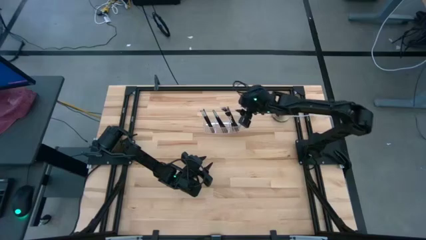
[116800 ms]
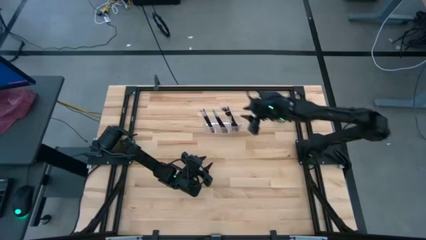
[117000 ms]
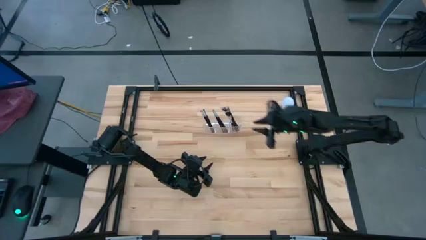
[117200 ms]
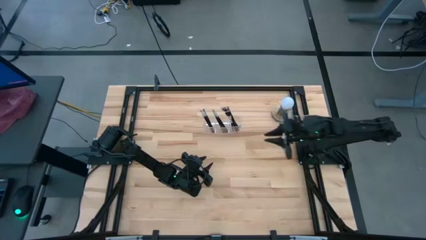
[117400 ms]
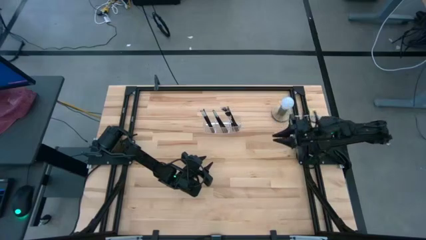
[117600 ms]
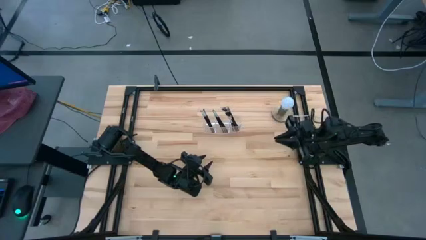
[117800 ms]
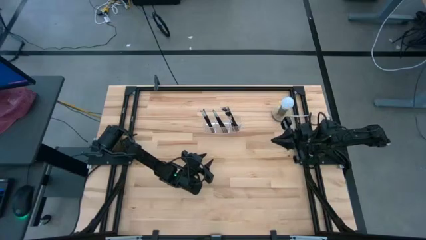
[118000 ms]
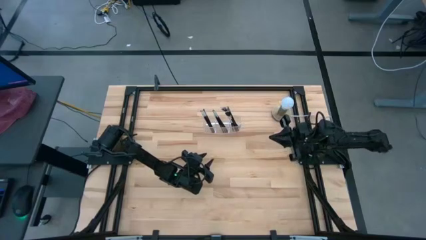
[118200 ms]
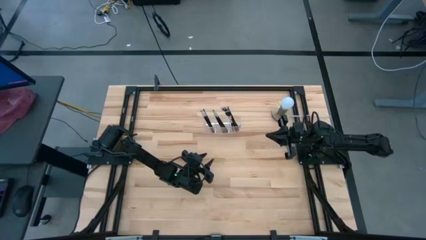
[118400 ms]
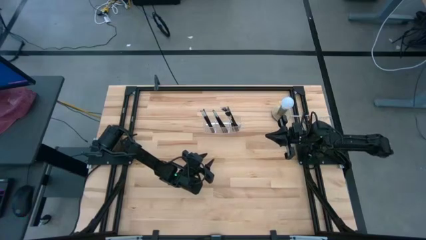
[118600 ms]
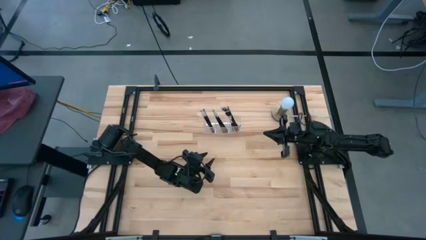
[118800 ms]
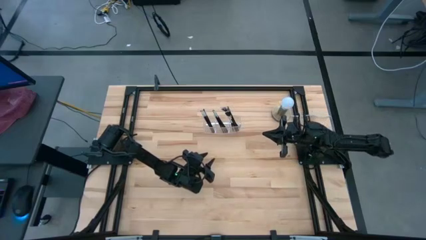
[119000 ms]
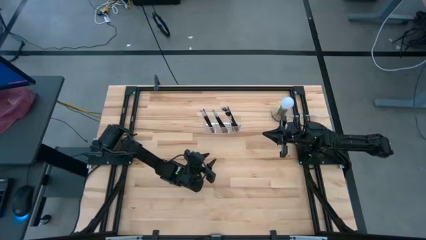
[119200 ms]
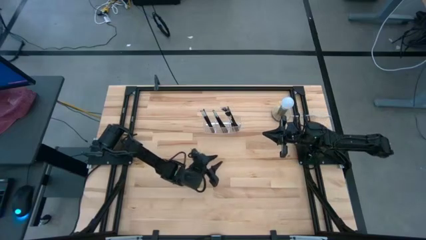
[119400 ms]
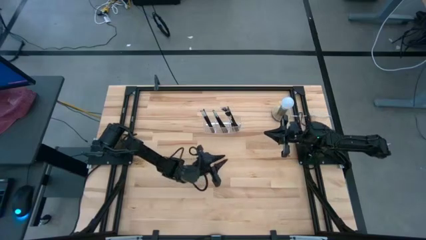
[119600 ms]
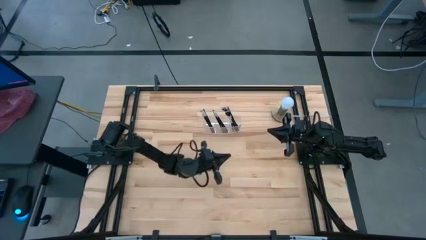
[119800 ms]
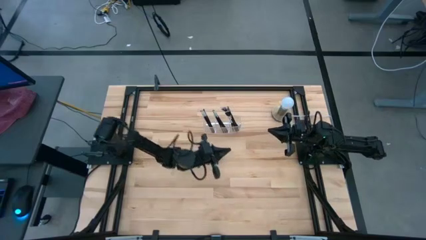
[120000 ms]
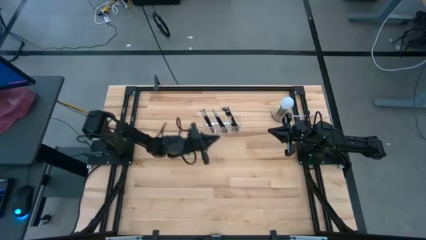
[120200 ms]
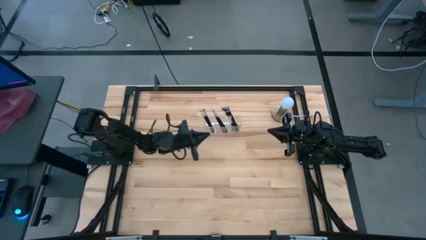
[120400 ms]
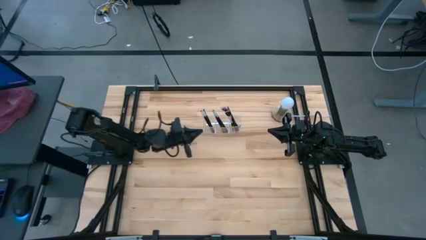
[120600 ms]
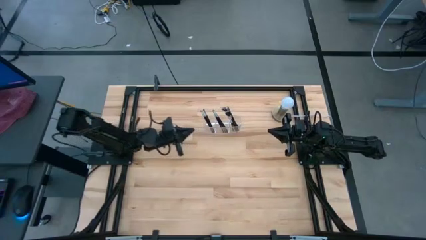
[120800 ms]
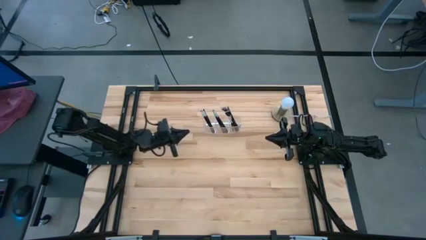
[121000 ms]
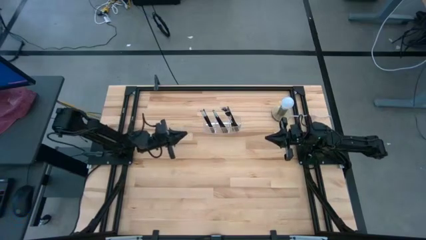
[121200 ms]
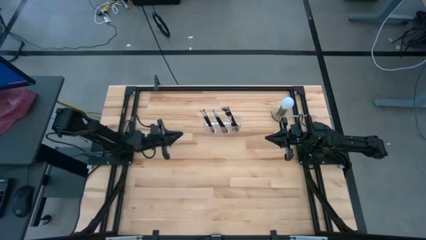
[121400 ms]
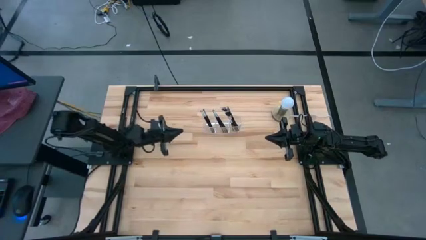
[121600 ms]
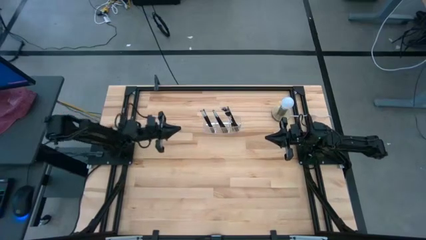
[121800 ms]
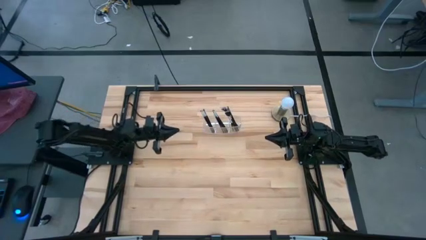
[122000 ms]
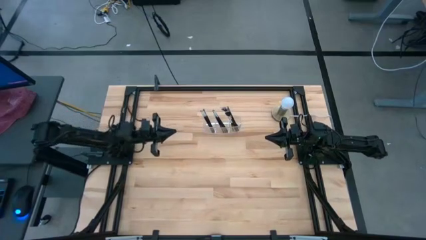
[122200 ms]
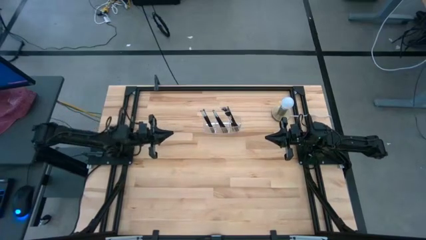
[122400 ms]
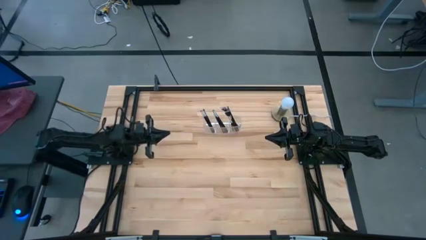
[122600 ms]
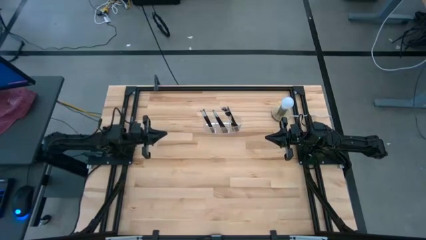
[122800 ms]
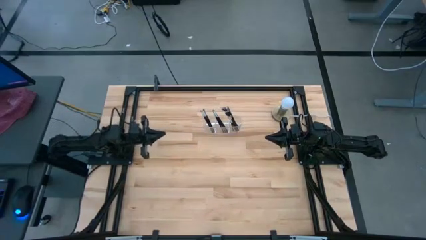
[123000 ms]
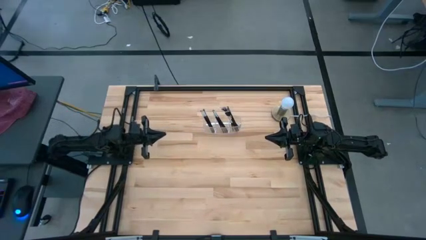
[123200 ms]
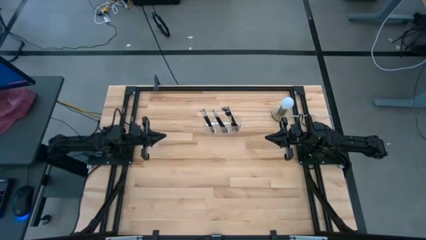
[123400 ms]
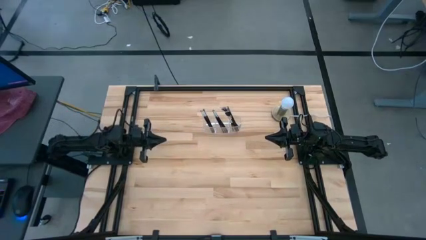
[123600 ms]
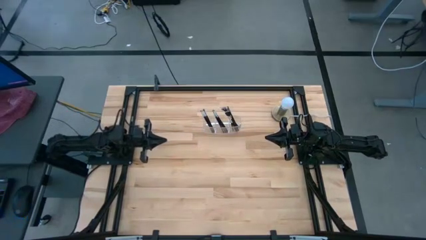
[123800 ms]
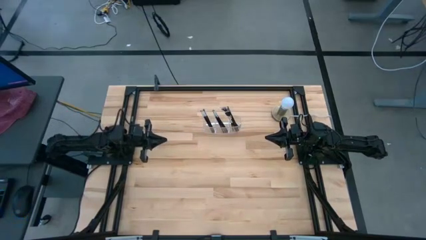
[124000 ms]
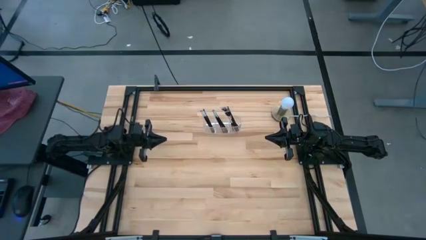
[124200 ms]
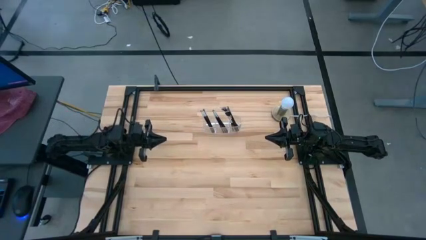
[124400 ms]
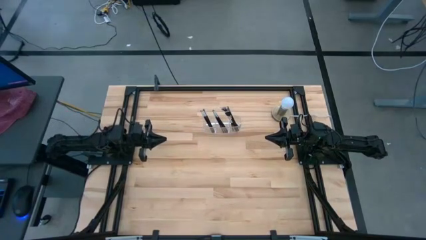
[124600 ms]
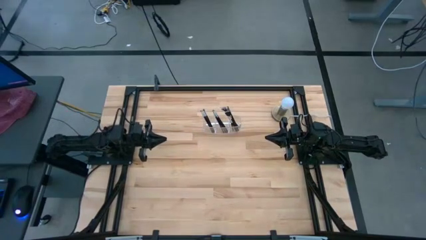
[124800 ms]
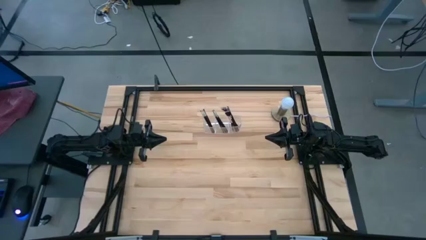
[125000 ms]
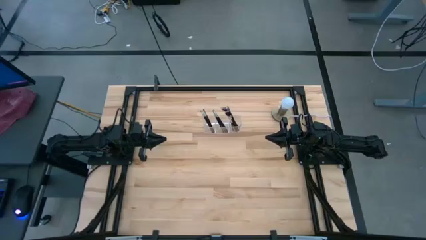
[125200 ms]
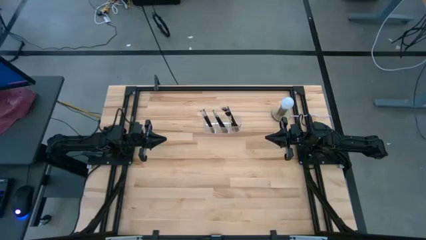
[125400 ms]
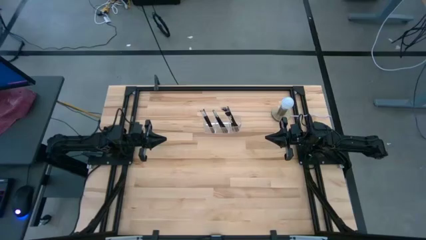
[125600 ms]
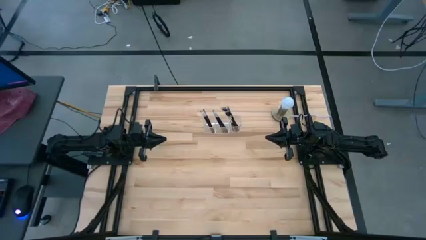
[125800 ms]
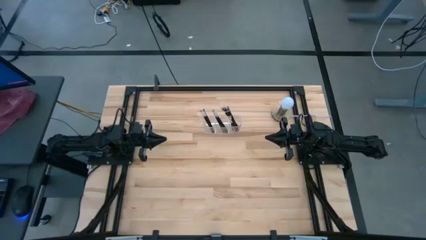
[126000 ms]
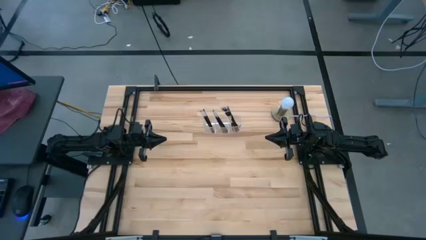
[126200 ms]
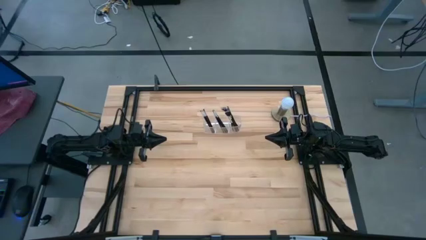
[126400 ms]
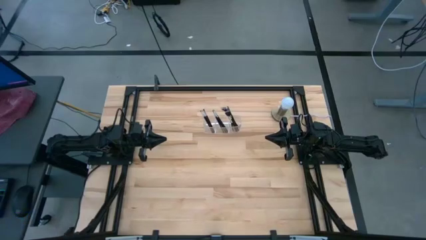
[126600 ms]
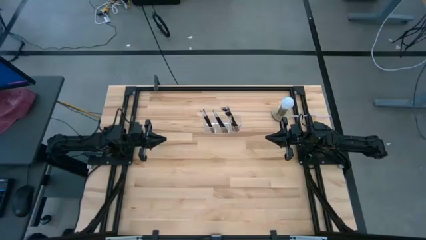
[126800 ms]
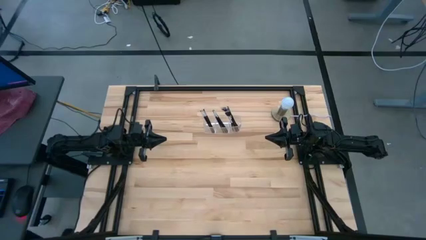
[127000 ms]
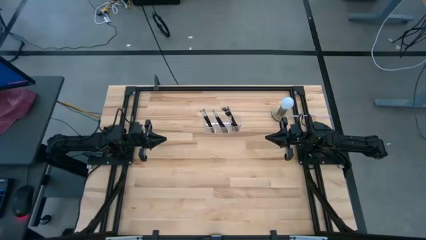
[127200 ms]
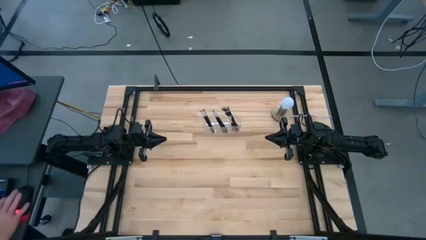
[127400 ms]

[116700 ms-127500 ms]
Task: Put items in baskets/containers
Return to Home Position

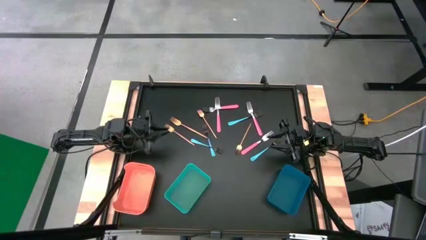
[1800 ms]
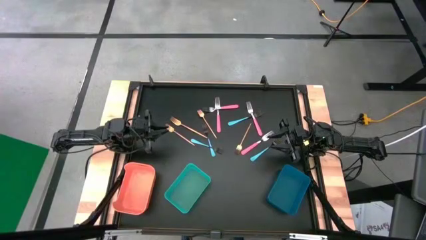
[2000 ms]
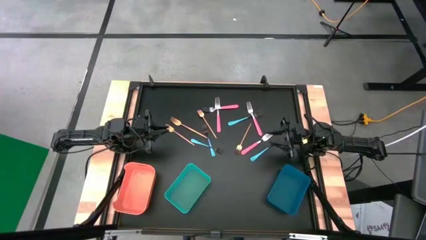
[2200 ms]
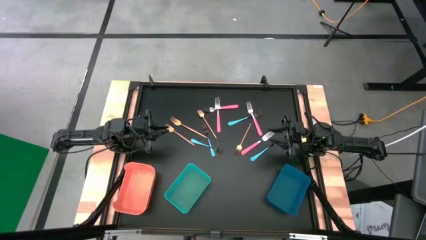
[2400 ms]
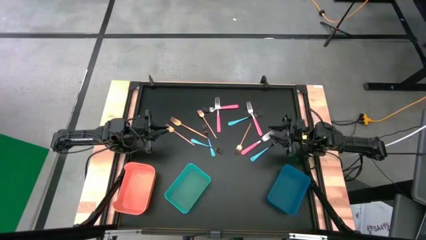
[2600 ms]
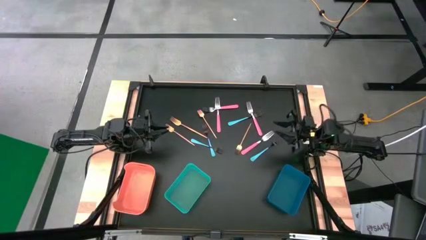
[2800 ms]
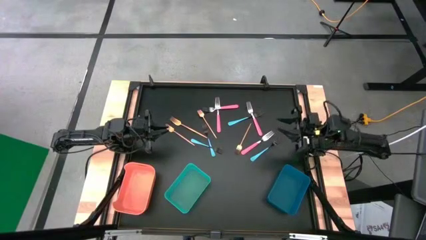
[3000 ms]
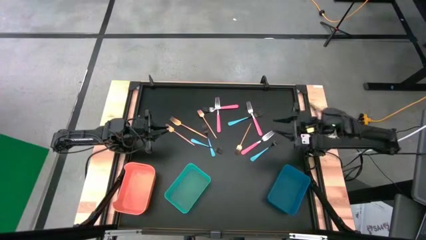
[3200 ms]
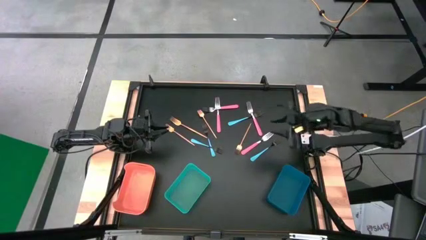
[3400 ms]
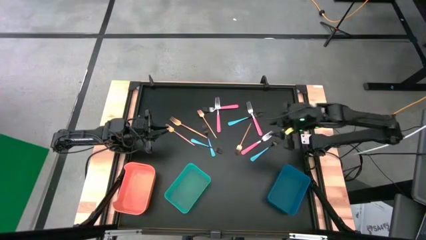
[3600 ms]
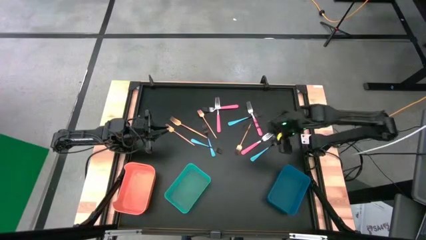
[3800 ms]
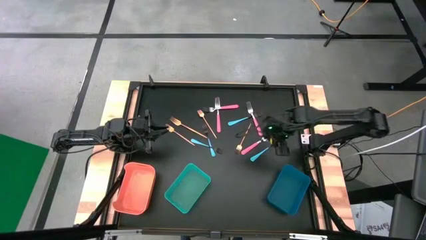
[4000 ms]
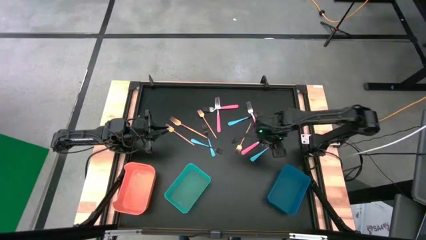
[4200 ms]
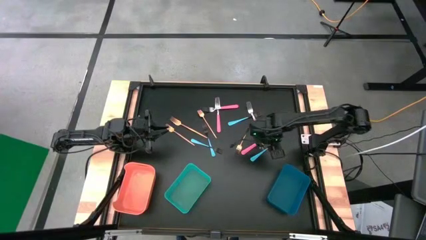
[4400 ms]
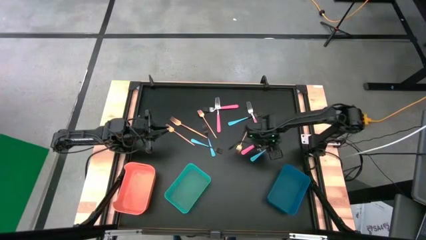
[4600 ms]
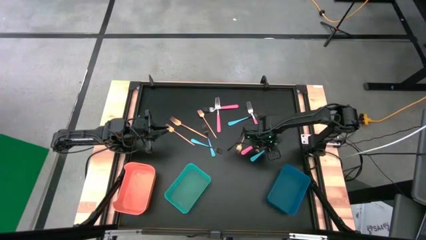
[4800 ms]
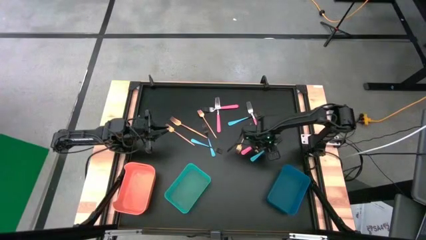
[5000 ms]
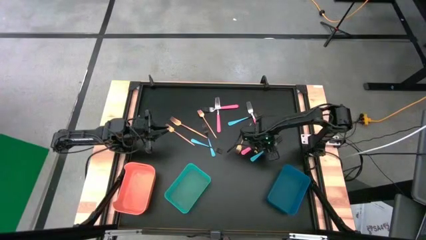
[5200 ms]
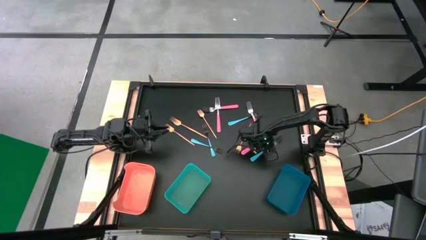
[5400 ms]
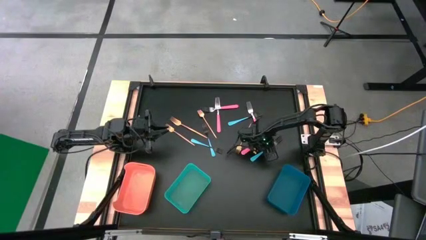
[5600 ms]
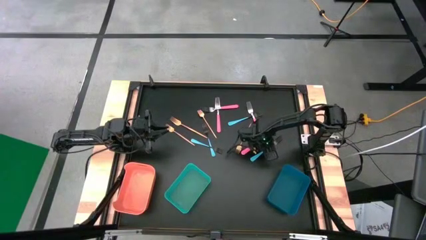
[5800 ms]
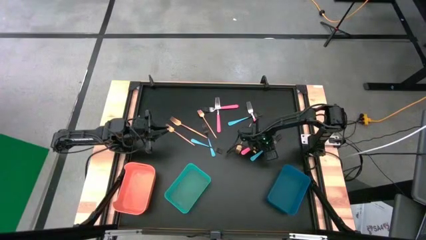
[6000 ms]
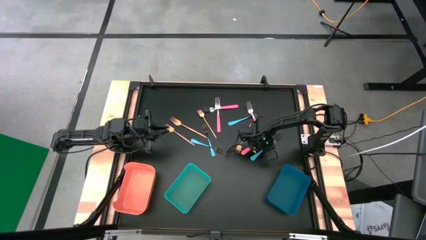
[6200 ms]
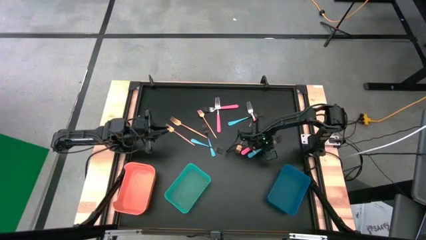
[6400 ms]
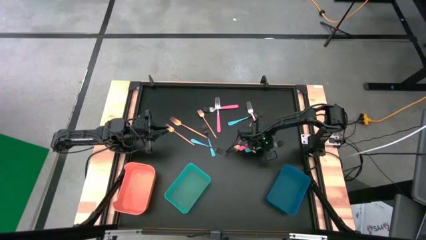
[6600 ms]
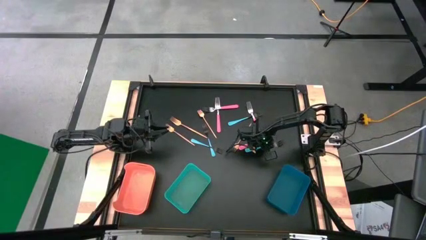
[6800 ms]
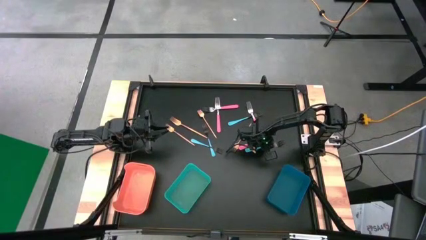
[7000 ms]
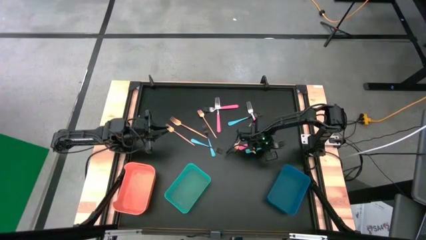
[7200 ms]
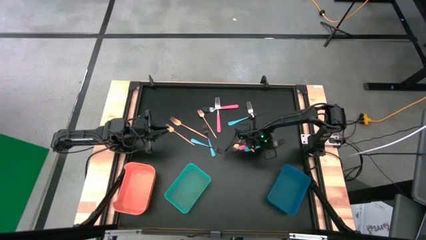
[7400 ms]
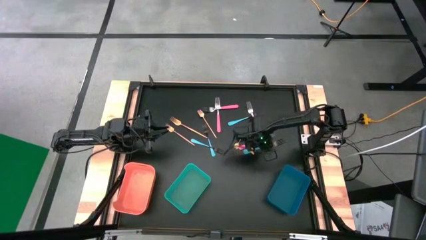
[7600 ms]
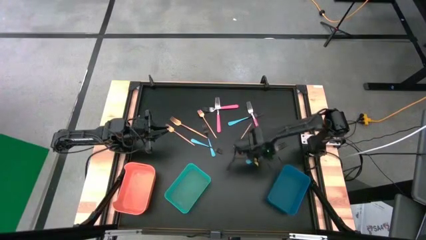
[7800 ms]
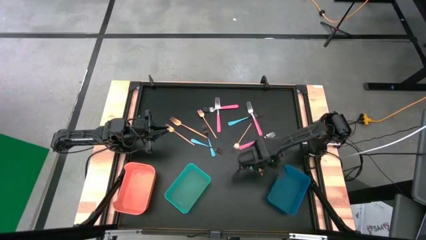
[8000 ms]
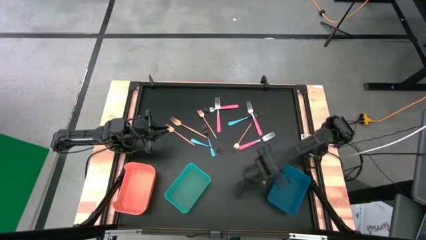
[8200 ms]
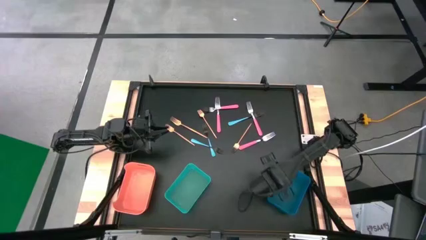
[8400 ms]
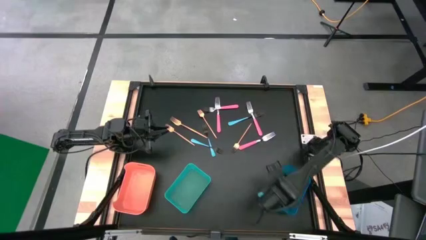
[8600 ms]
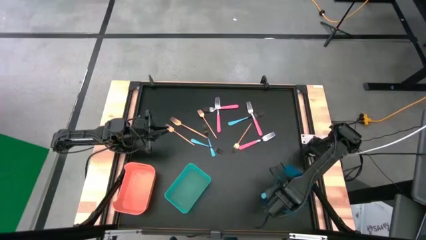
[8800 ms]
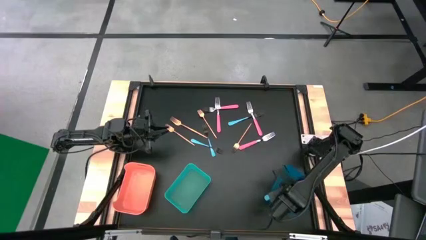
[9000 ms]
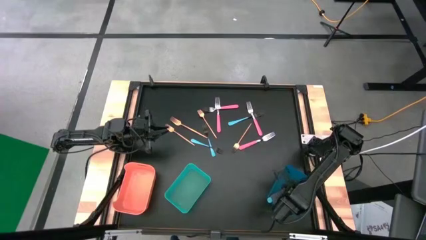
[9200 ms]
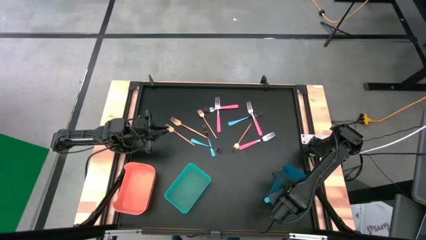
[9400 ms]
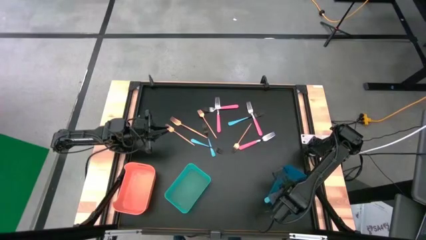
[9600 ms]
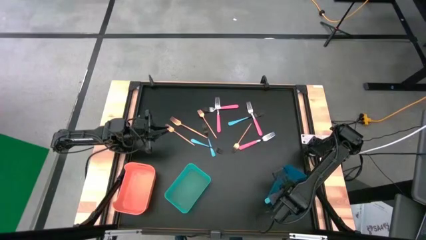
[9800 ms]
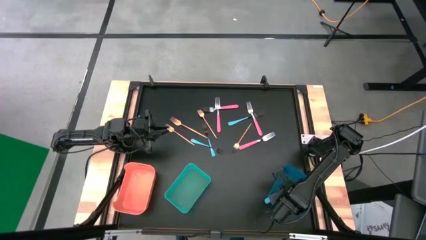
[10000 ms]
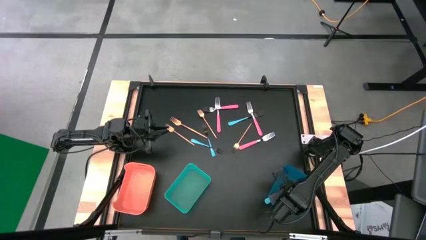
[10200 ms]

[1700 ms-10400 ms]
Task: Sort silverware by color (type)
Put the blue fork into the blue bin
